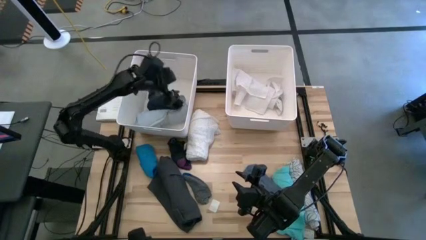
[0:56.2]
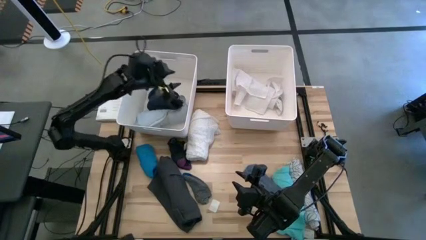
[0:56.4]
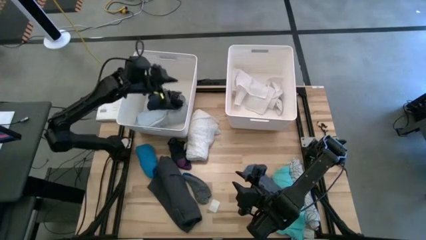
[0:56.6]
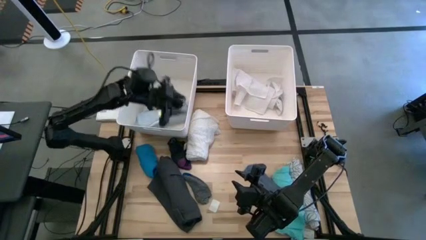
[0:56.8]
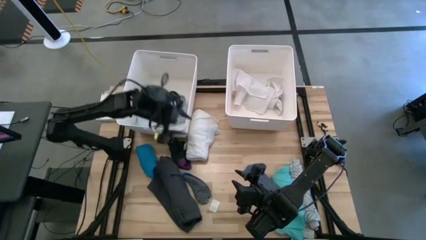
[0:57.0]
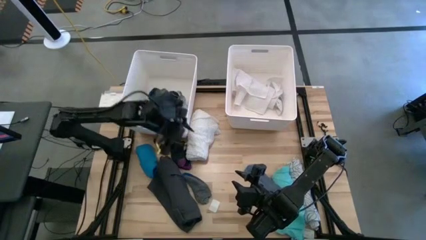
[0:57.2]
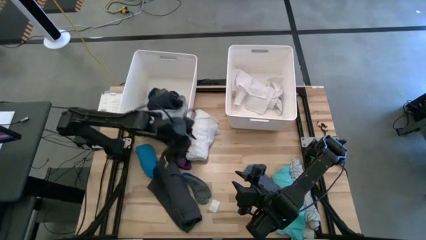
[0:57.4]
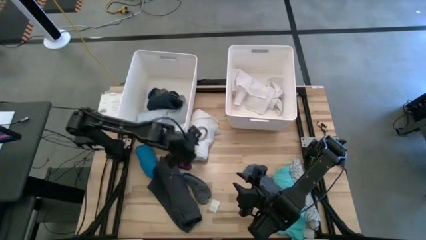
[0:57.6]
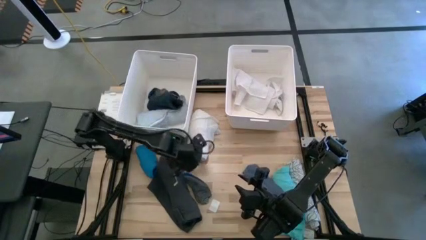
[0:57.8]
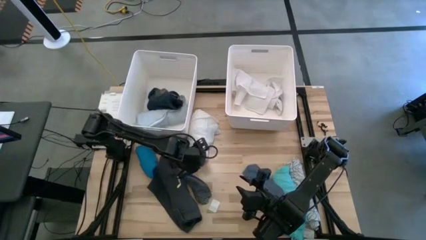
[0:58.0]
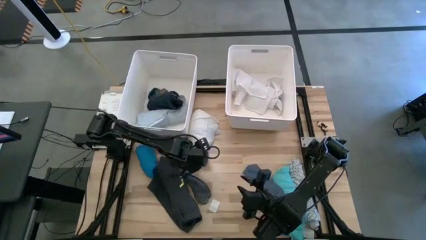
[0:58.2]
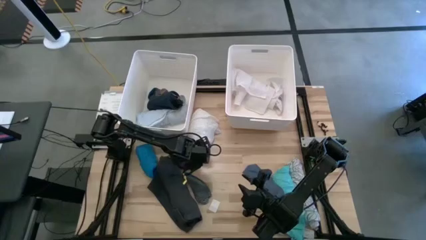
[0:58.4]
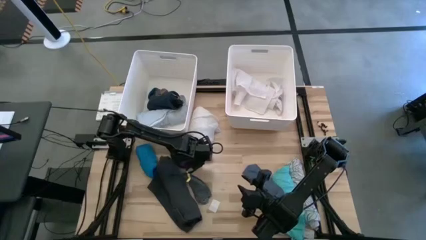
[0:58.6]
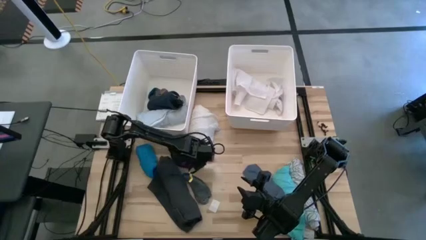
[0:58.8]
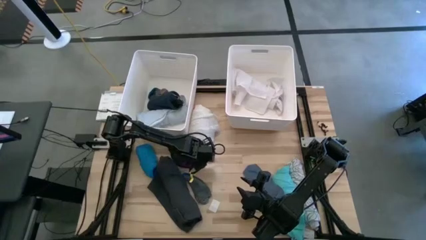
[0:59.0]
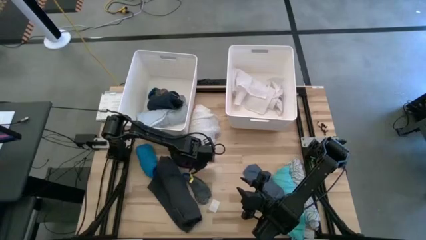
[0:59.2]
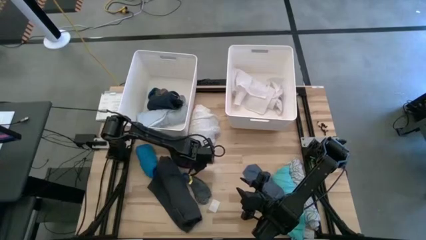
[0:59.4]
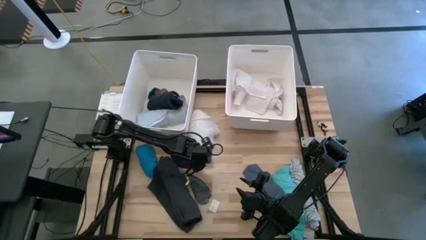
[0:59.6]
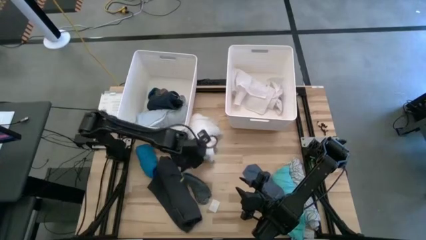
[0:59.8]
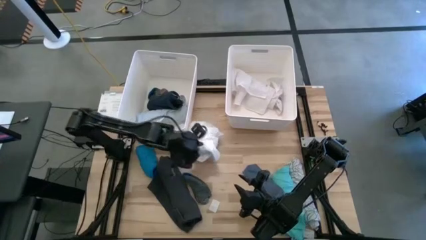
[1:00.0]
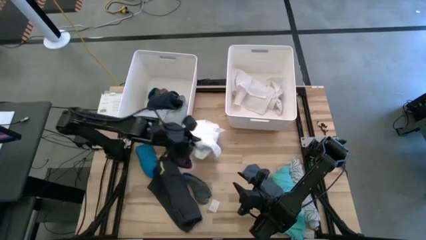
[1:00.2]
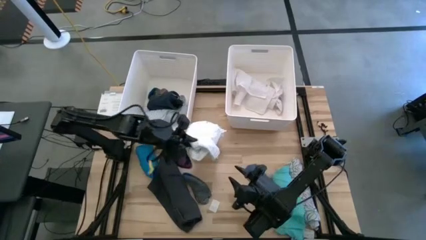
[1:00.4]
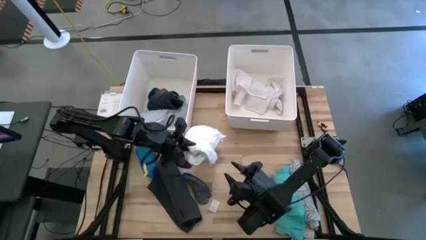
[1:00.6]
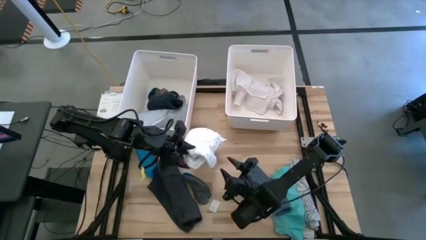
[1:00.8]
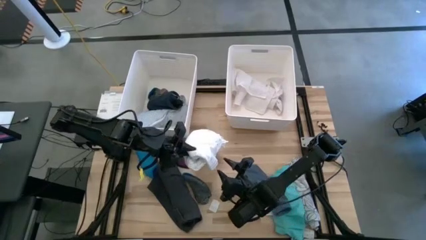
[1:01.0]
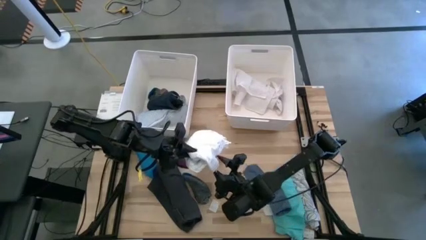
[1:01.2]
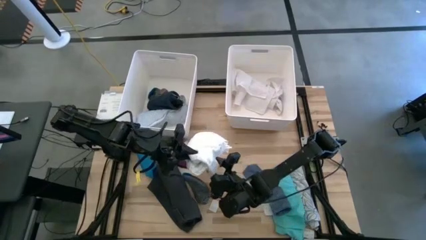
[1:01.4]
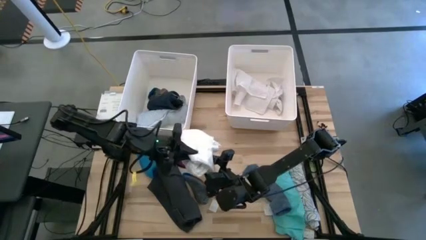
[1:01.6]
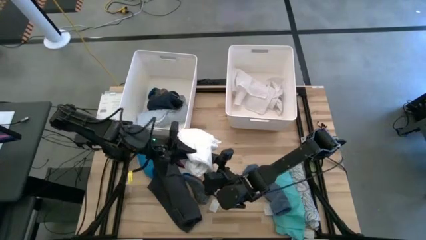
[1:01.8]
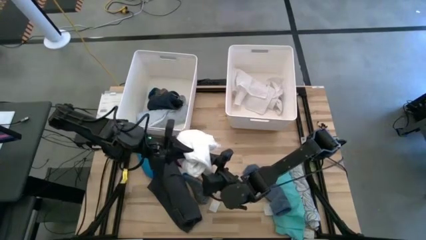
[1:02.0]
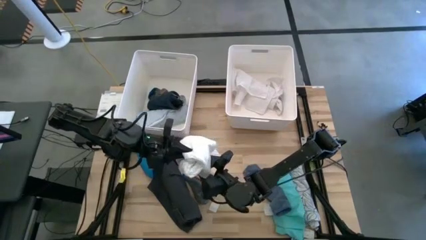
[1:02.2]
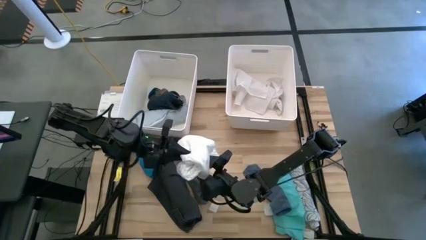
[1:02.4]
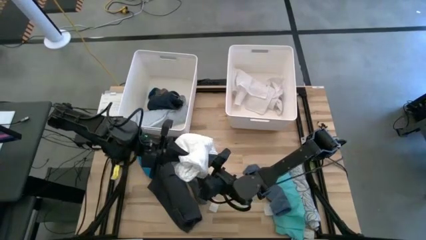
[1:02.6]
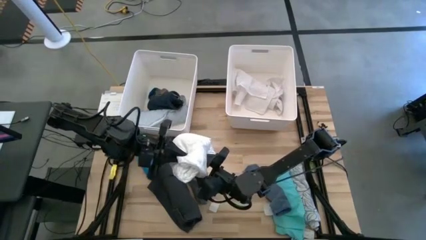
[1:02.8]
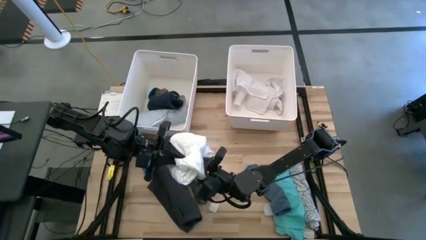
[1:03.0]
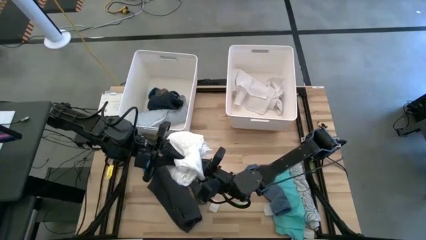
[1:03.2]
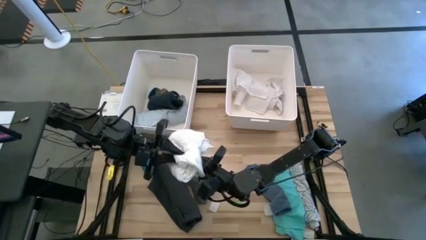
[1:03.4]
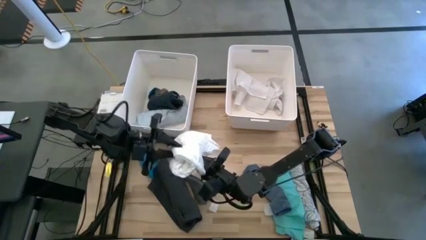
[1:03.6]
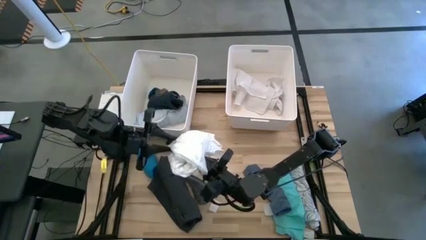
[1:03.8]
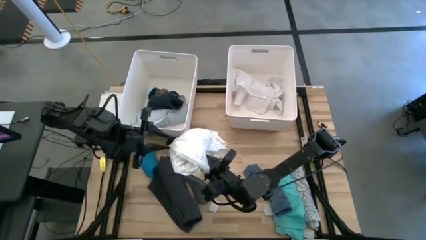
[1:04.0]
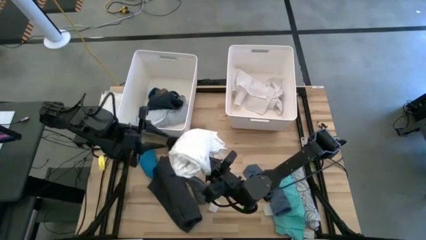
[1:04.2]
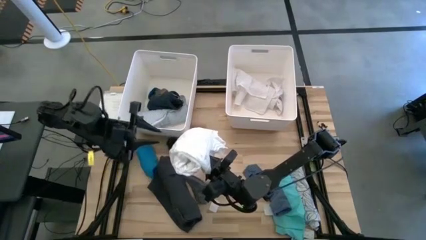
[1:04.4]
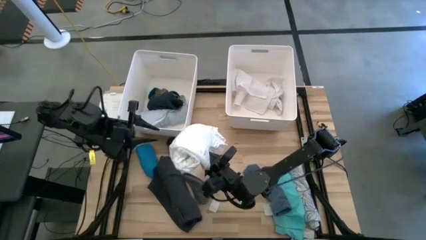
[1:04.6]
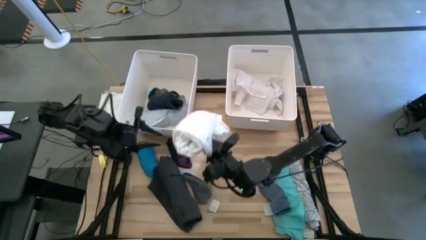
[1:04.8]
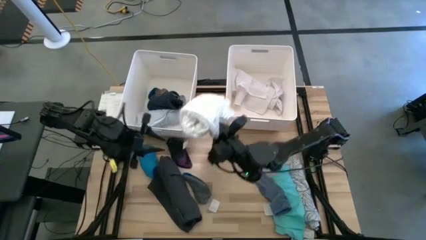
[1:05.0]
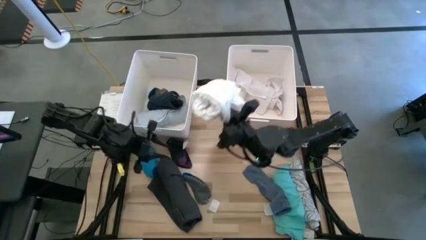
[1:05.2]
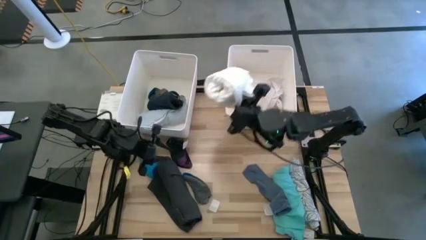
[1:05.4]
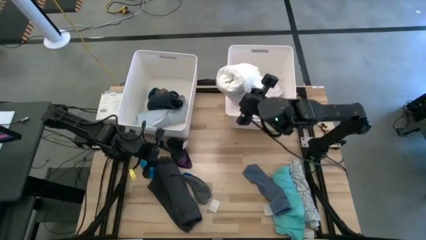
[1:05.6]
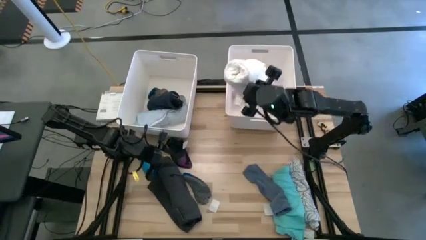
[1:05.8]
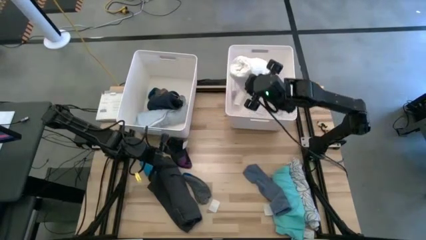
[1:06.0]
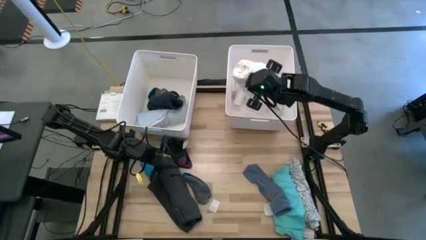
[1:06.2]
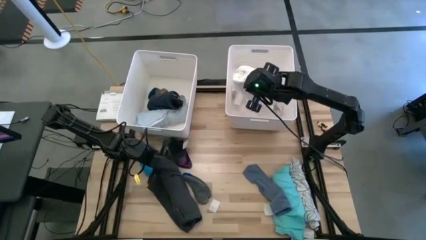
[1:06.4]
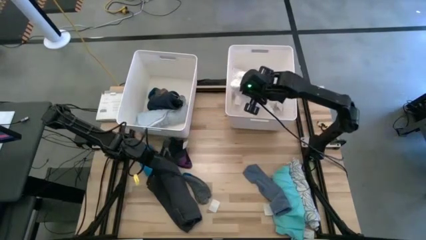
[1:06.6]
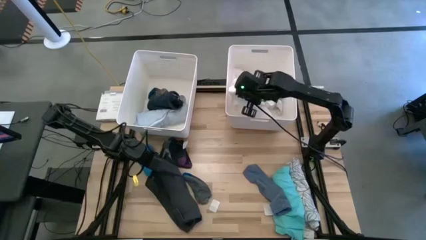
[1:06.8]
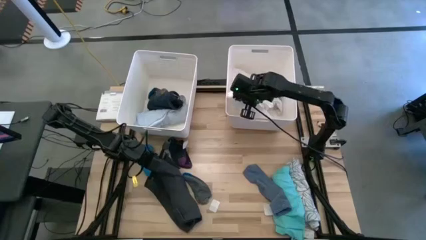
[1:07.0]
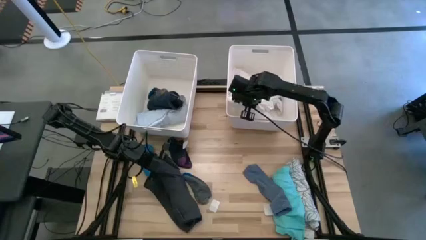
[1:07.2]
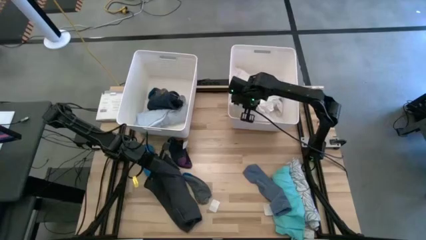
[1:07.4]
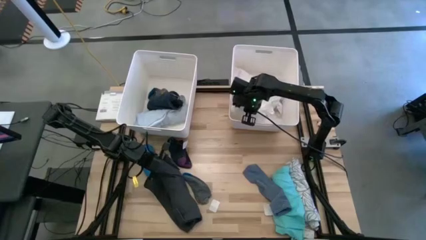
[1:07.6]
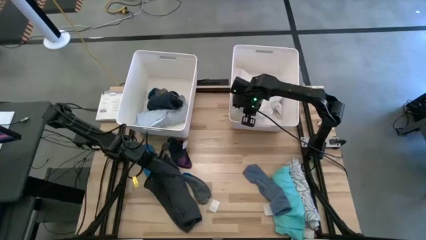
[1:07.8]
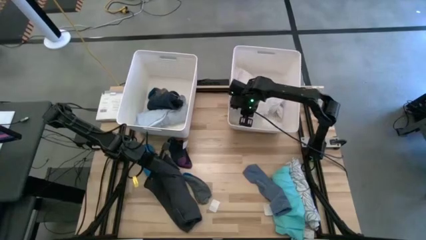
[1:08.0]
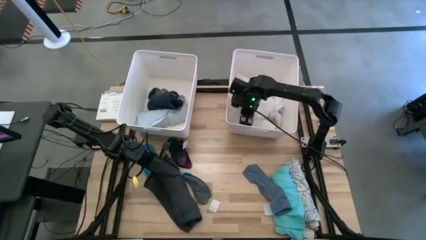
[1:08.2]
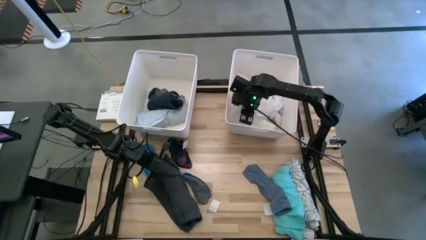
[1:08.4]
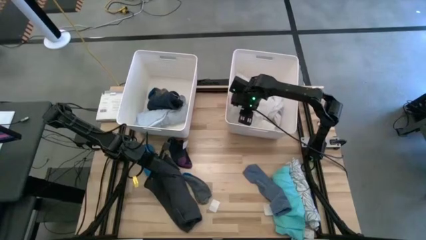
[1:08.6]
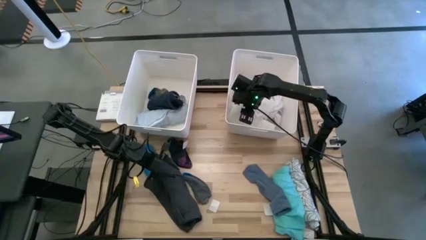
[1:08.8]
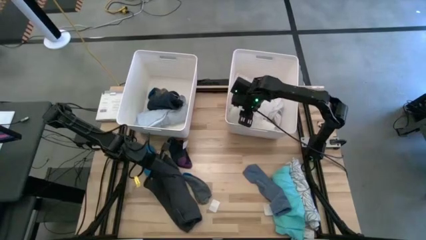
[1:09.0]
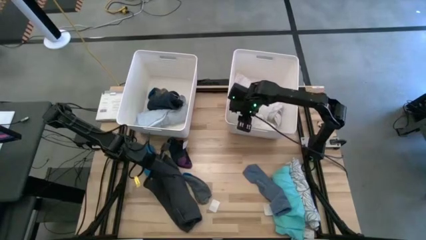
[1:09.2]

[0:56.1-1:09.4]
Task: Sort clothes
Put the rolled white dress into the right white bin
